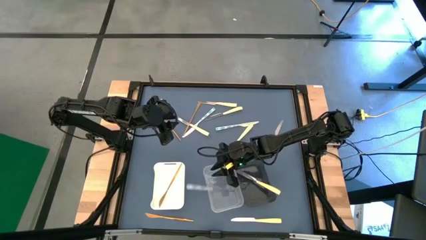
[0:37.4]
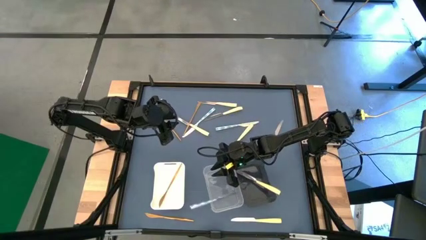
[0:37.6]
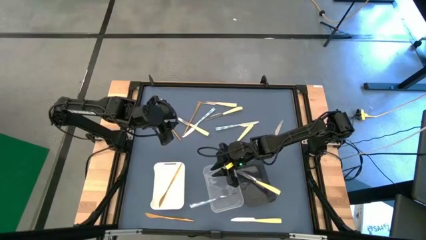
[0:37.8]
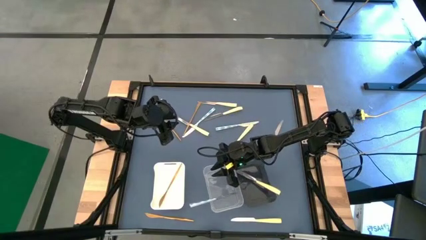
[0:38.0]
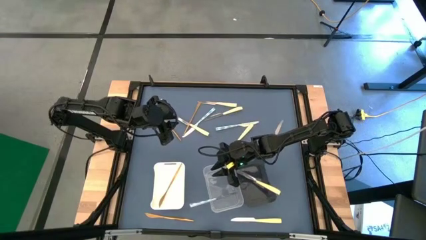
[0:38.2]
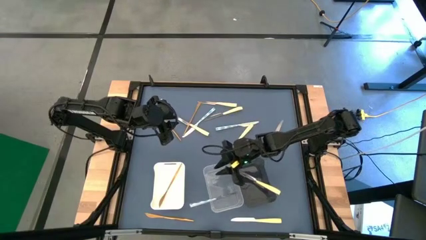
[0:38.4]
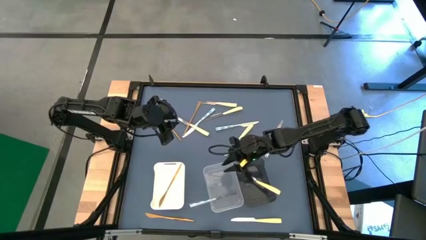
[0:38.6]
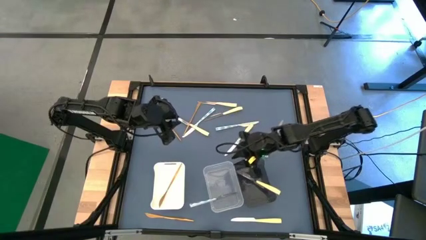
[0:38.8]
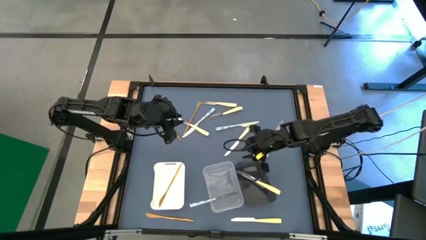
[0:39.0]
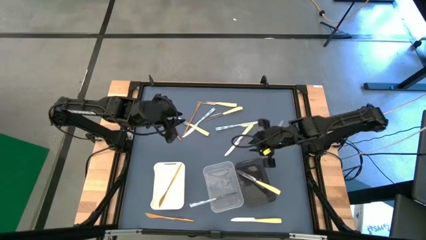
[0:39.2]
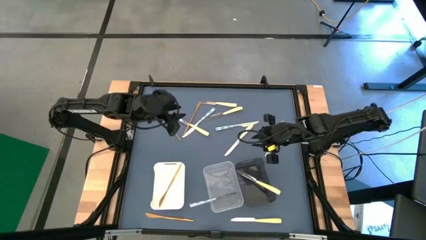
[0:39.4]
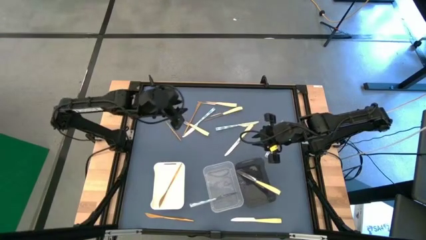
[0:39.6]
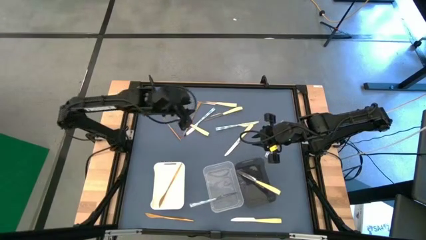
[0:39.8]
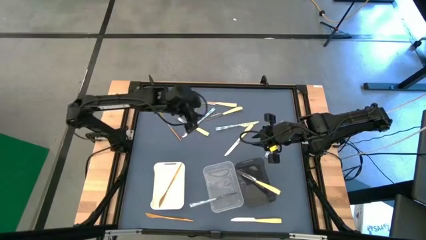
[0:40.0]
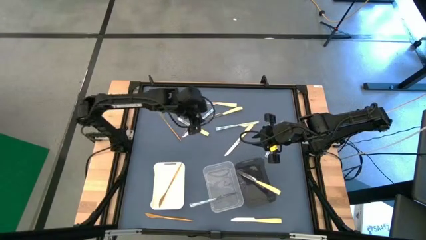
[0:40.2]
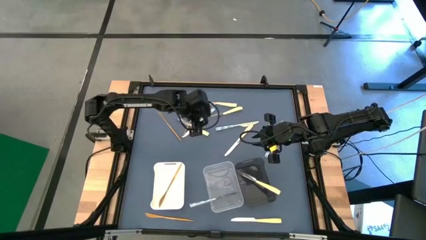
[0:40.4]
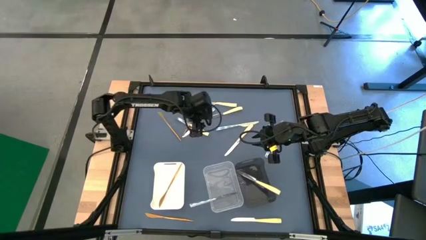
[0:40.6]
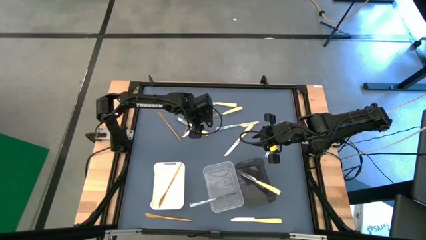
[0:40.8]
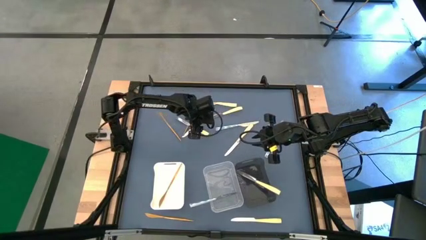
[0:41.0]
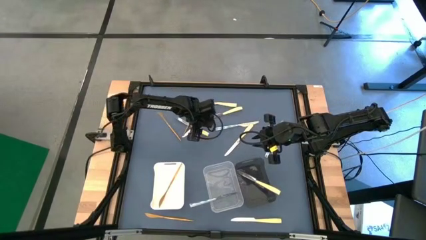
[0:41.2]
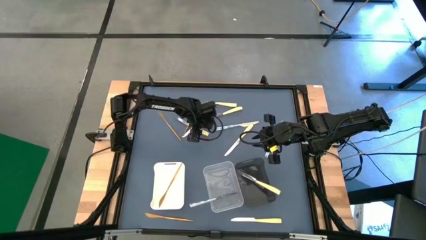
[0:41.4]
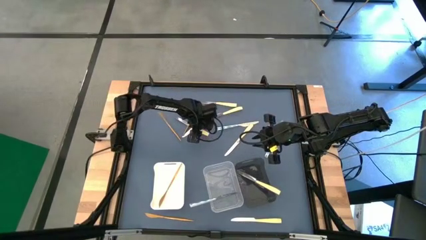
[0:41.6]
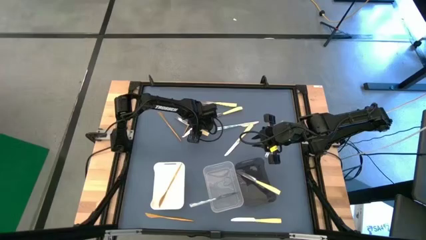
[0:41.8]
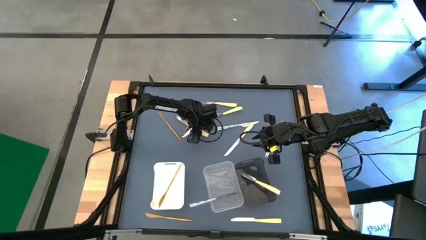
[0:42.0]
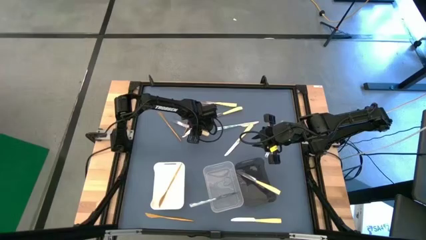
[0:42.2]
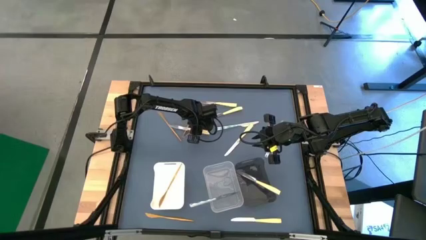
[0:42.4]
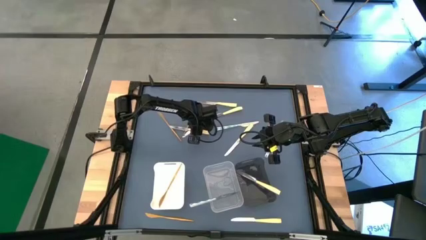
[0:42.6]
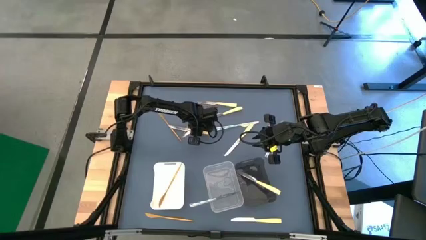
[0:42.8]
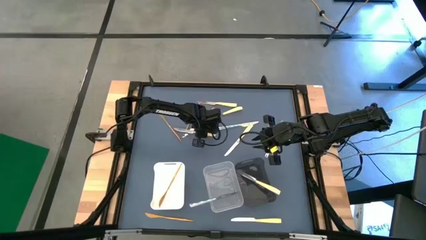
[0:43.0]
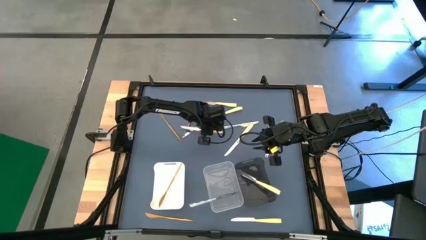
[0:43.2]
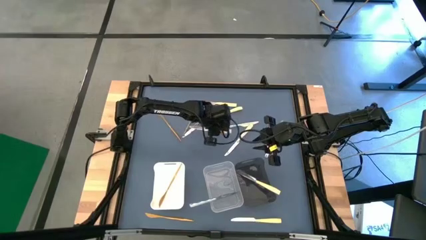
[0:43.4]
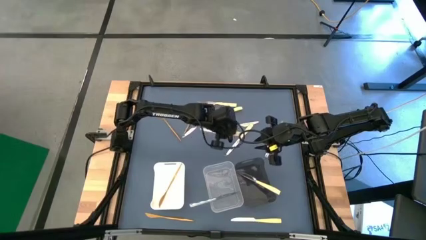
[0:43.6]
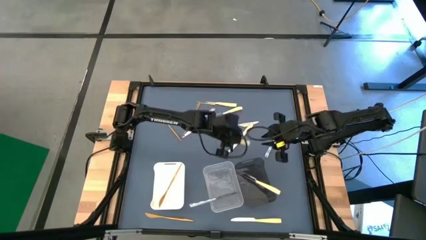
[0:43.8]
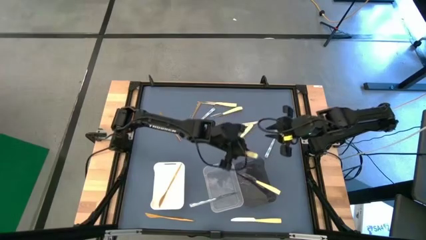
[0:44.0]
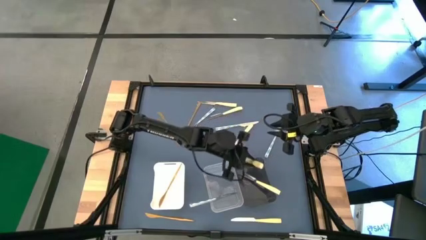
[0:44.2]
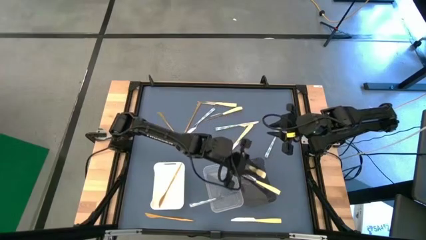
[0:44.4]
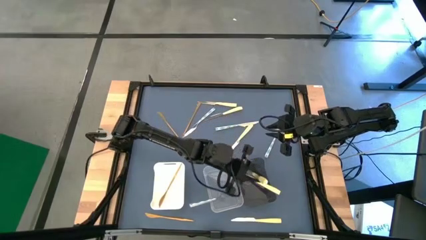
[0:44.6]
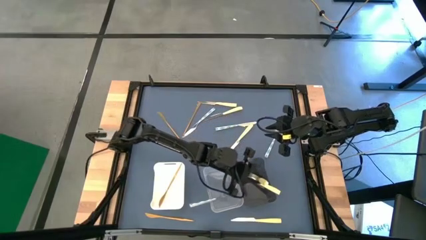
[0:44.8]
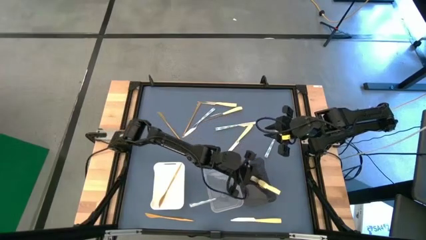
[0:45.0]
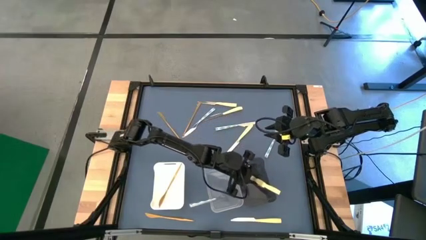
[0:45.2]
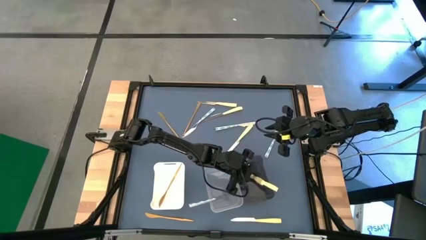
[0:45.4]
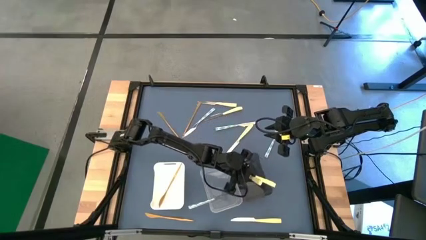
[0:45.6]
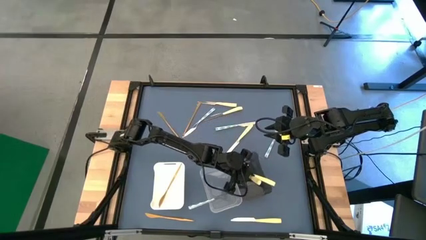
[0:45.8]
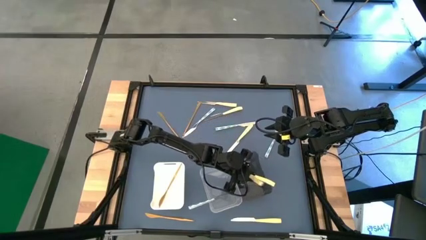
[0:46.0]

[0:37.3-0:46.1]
Task: Sort silverware by color (type)
Put the yellow table knife into the black transparent bin

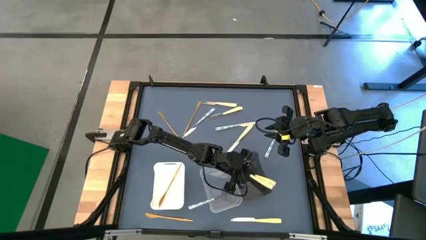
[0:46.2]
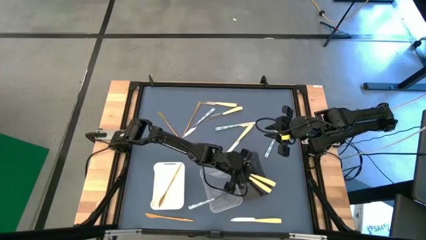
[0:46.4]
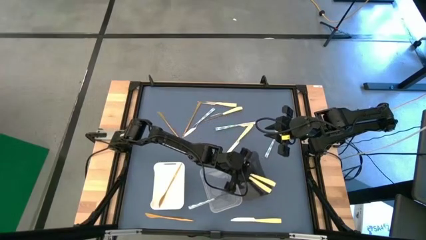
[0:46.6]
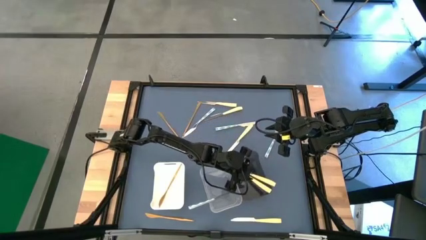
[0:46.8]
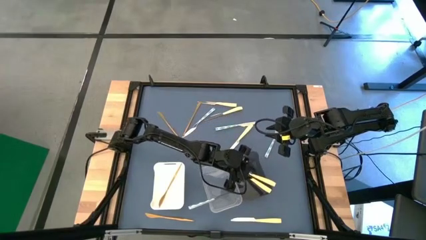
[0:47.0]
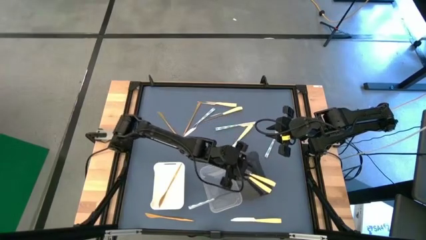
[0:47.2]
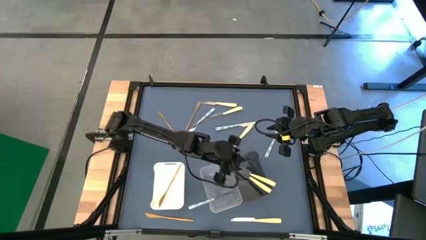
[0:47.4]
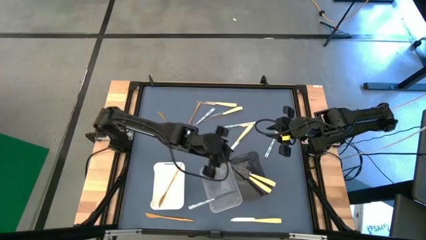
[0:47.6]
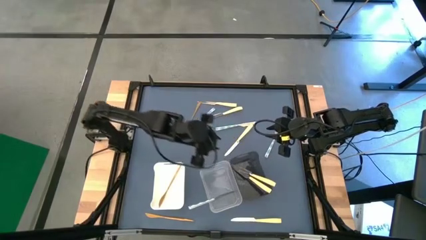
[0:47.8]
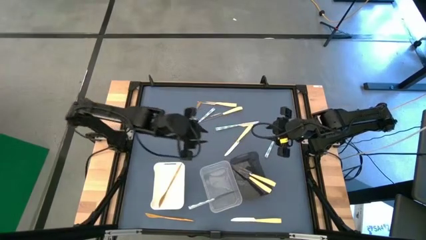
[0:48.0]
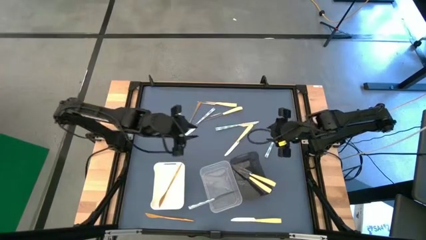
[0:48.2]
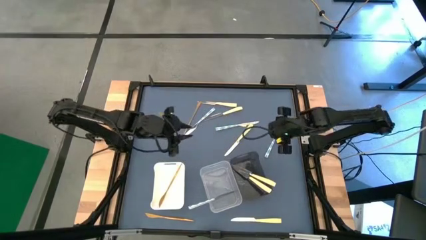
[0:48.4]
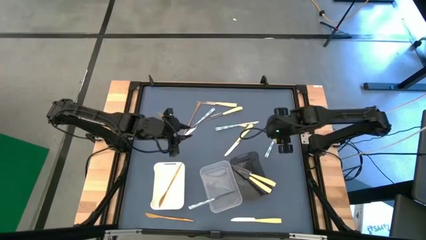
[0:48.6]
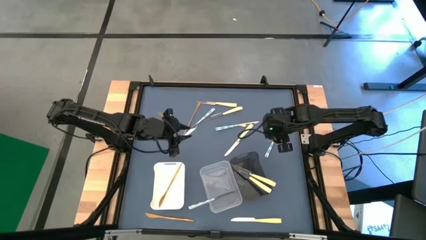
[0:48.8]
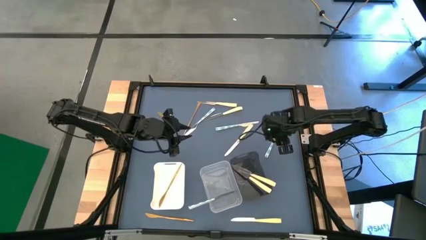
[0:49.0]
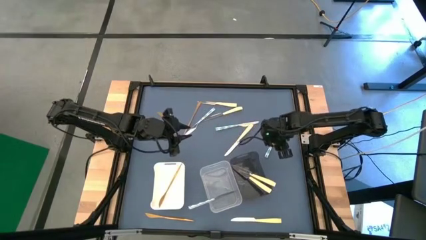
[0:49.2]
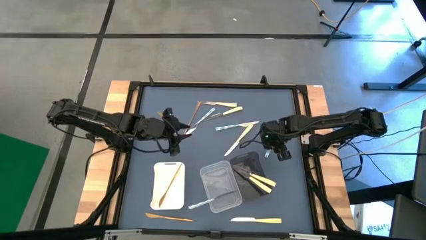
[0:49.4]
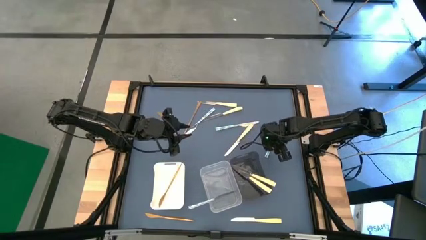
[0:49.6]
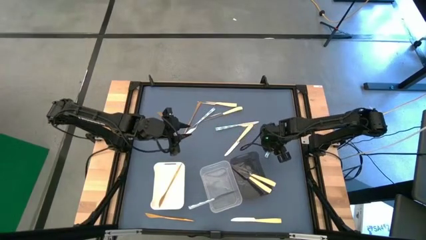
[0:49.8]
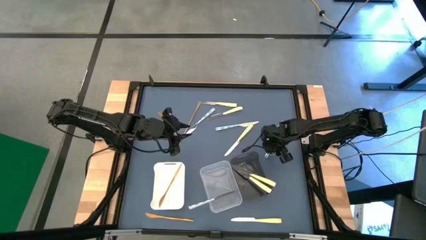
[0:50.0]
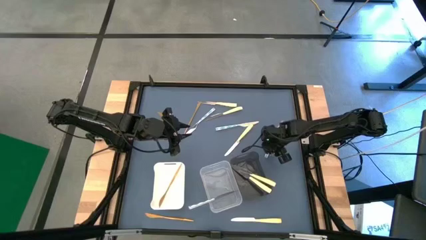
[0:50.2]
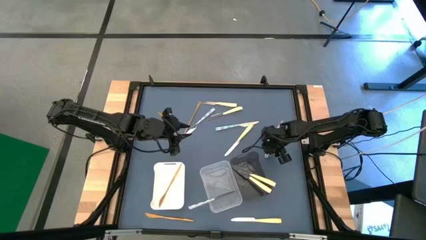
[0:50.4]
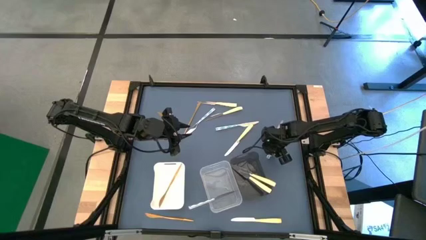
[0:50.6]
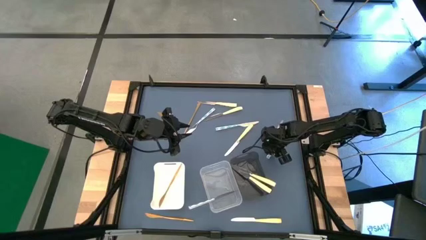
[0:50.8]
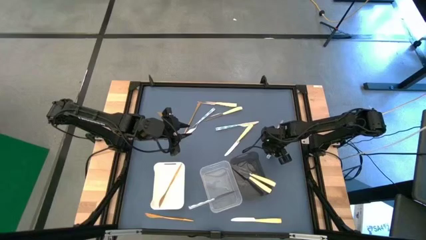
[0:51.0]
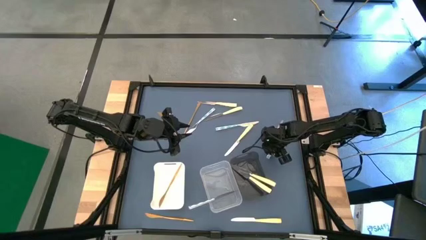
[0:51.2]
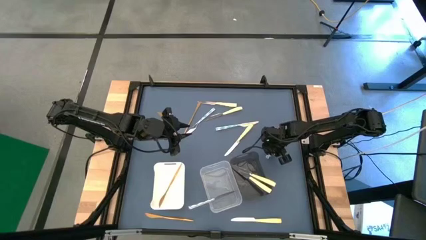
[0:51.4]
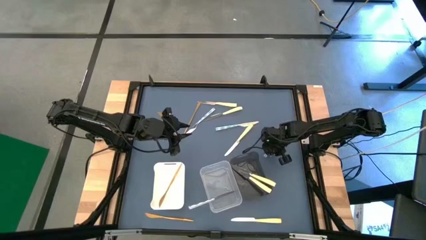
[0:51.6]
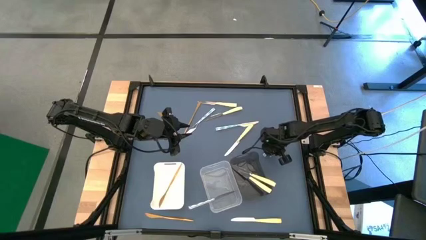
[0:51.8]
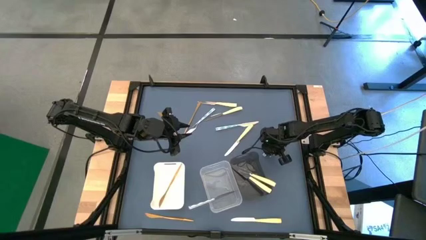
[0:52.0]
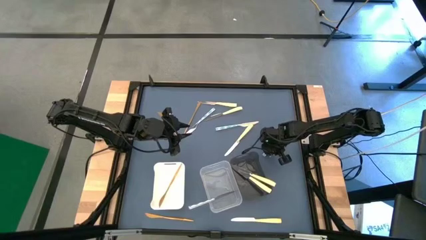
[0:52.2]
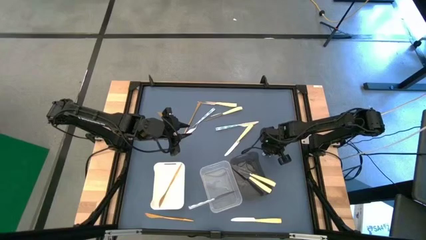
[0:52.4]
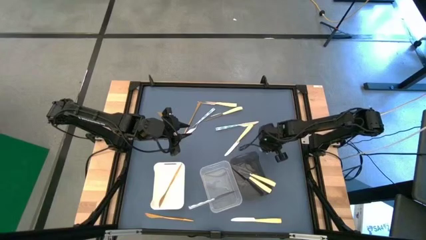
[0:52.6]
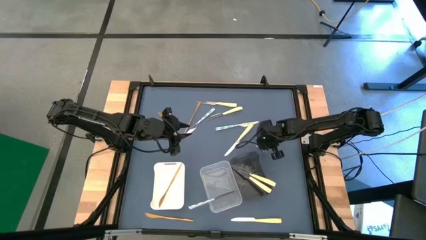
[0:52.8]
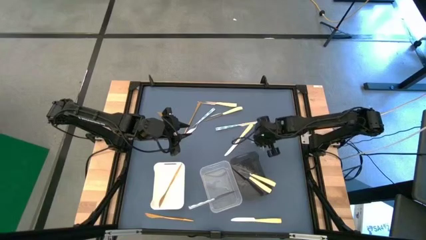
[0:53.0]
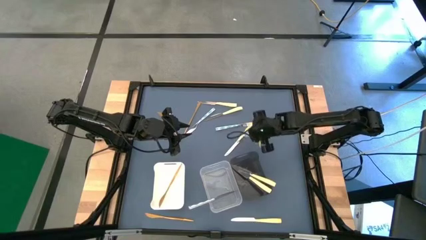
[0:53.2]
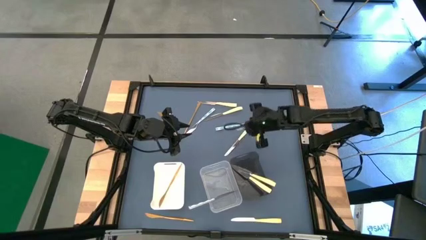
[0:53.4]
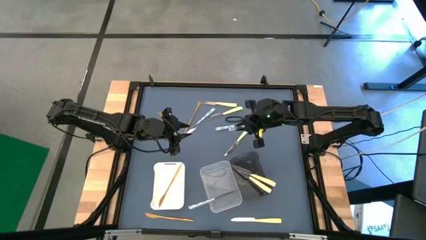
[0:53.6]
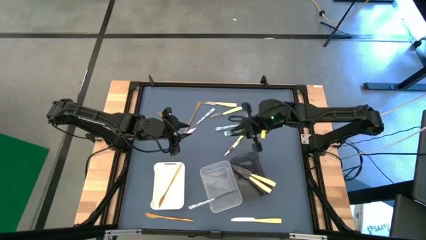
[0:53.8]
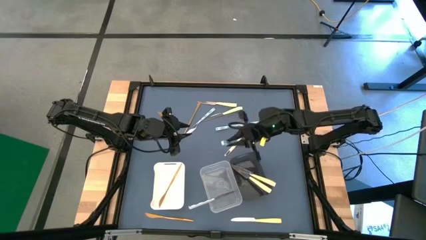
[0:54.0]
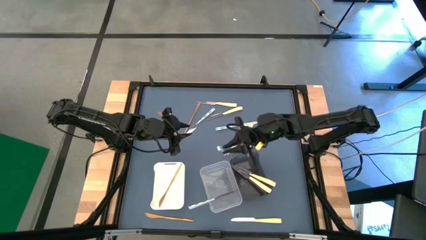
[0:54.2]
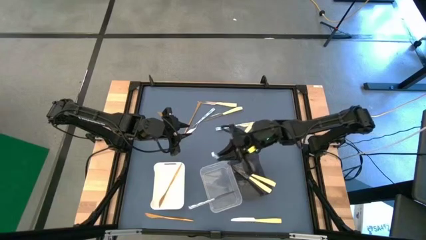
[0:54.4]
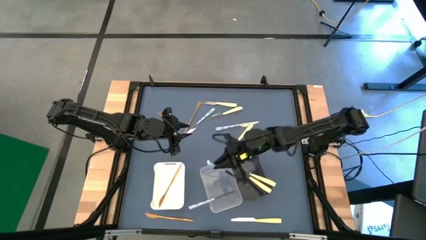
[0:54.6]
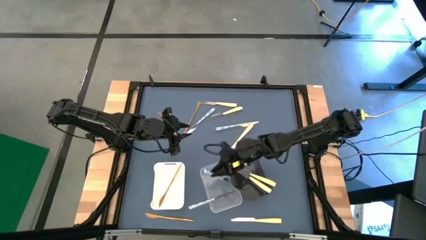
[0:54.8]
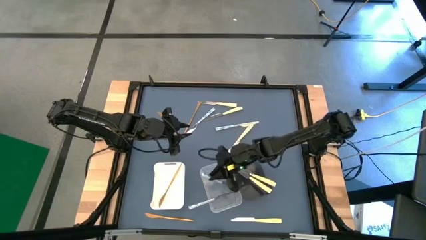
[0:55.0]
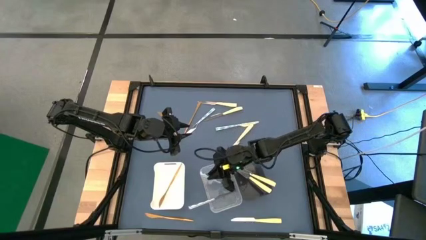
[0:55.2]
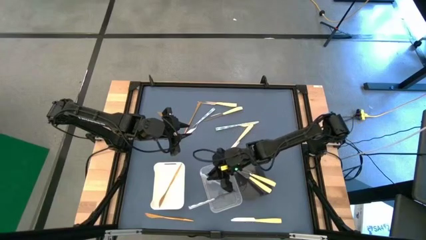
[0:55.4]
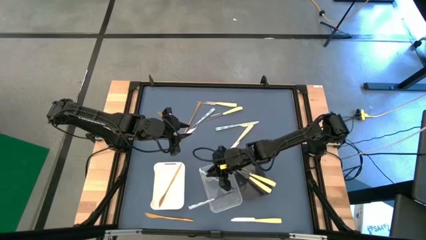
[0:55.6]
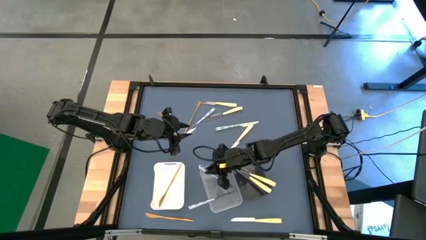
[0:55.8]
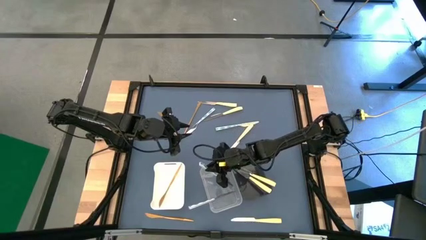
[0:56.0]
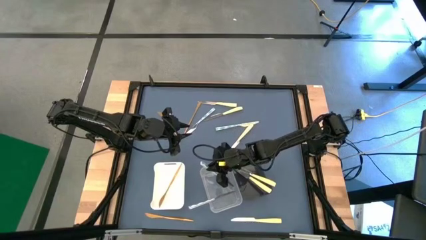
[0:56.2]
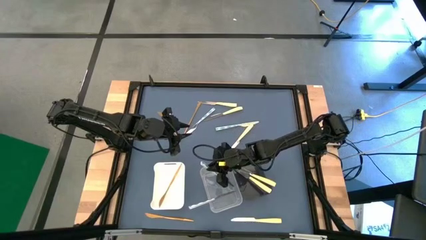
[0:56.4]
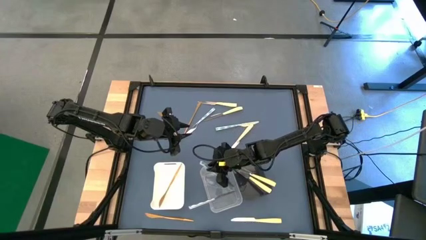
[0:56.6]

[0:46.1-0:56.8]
Put the blue patterned table knife into the transparent bin
